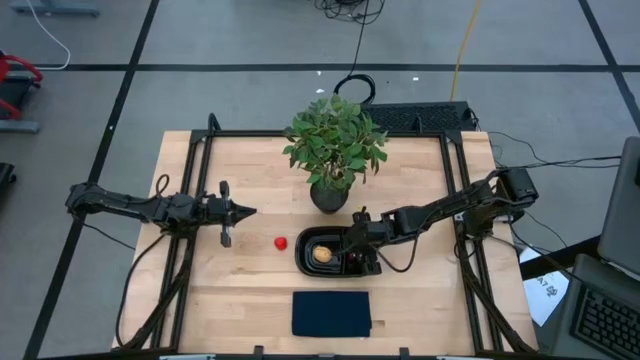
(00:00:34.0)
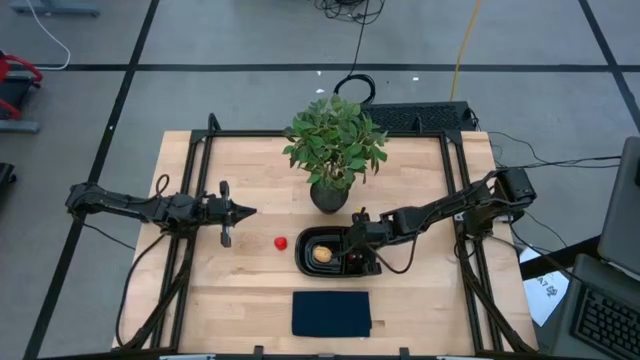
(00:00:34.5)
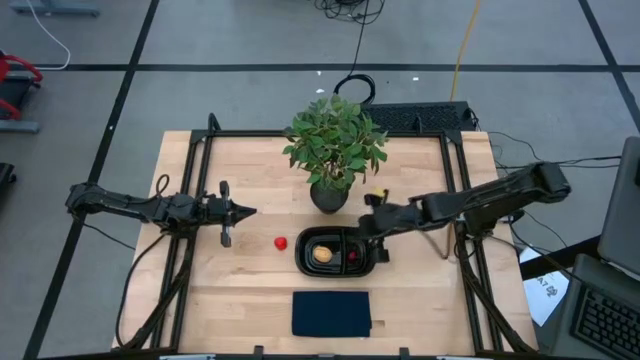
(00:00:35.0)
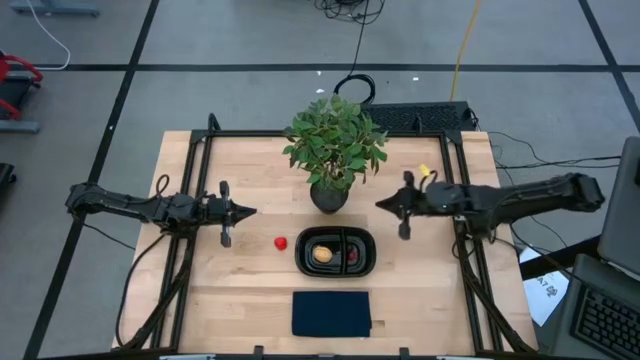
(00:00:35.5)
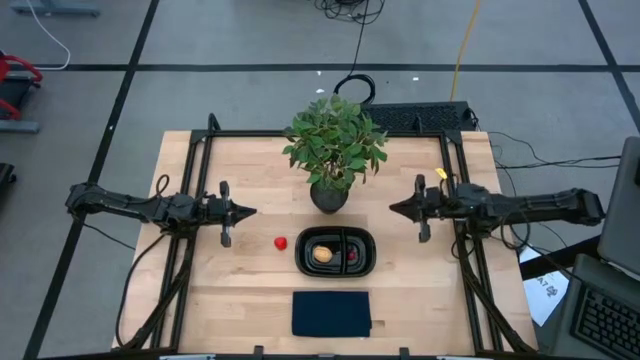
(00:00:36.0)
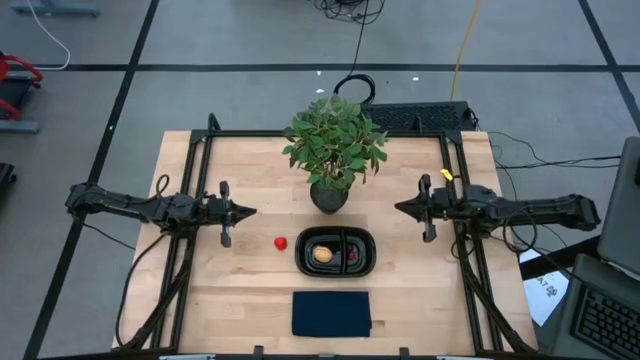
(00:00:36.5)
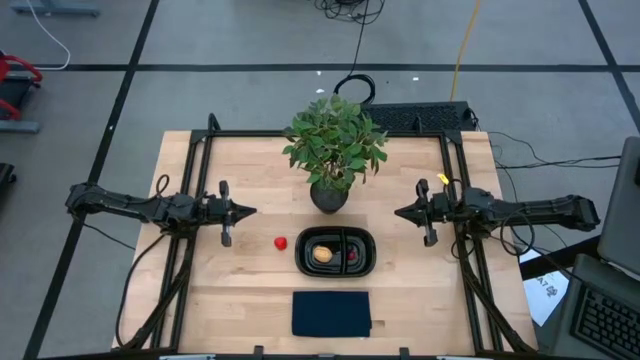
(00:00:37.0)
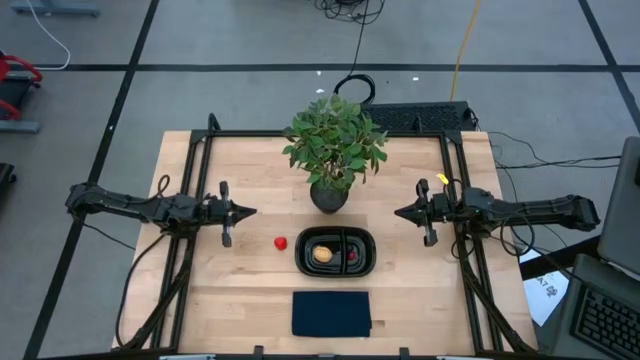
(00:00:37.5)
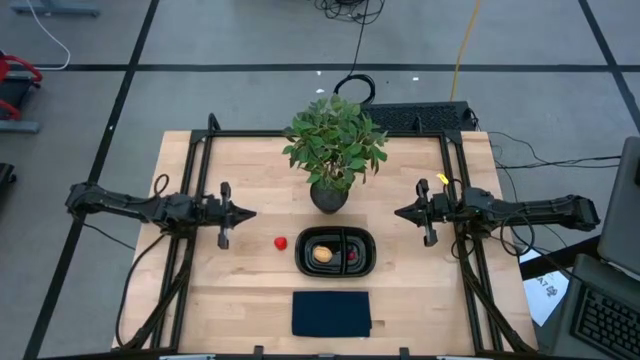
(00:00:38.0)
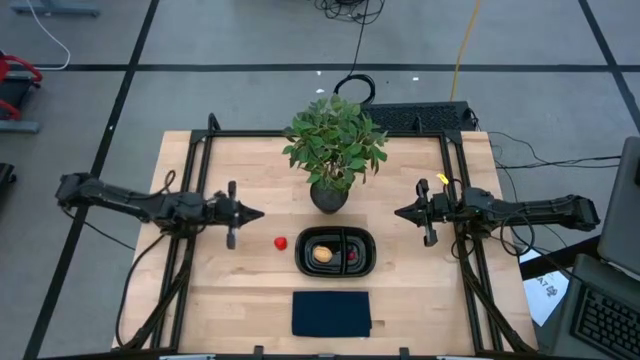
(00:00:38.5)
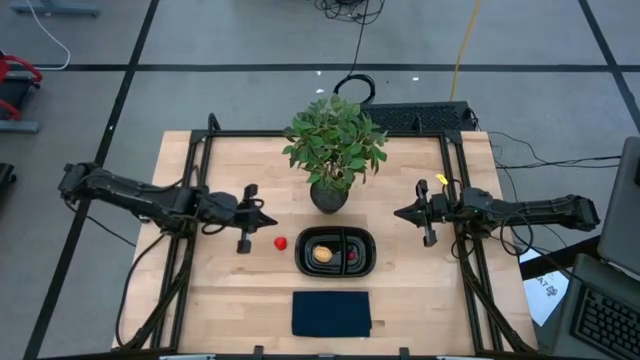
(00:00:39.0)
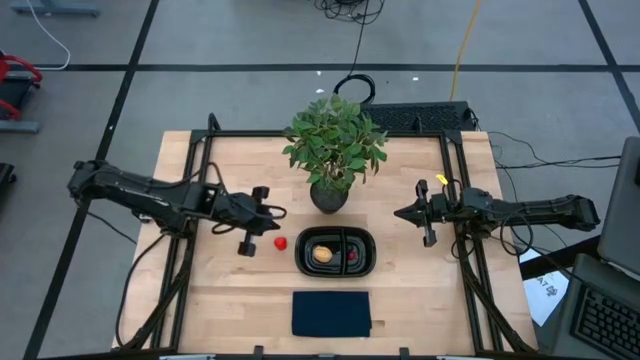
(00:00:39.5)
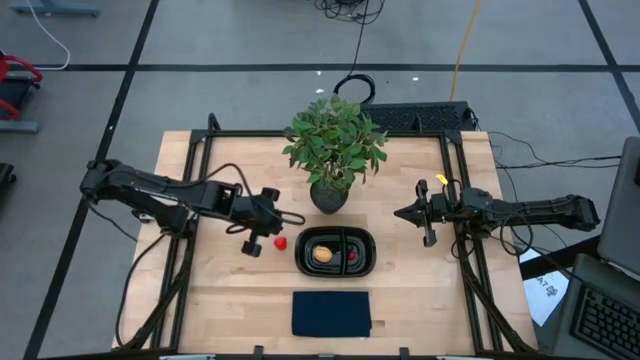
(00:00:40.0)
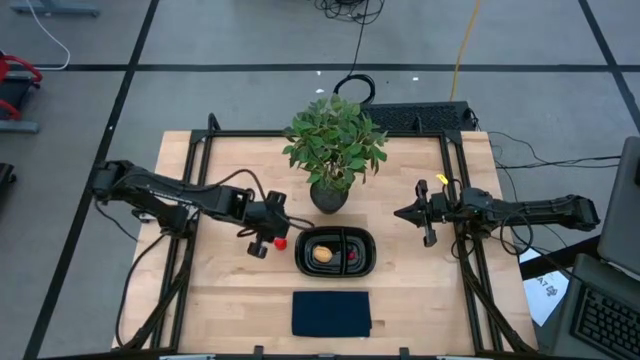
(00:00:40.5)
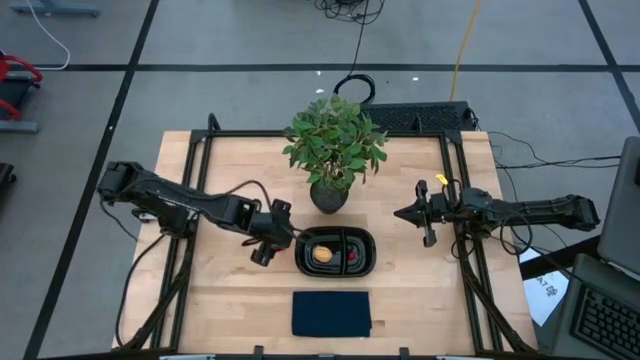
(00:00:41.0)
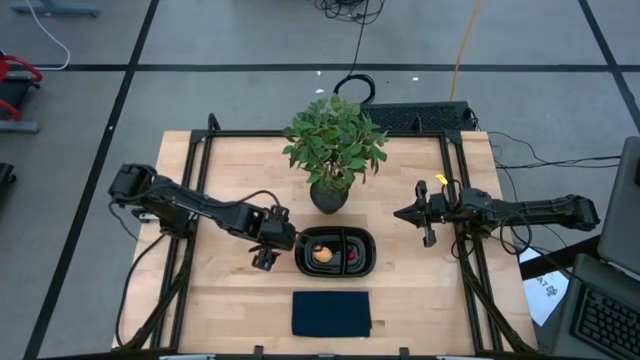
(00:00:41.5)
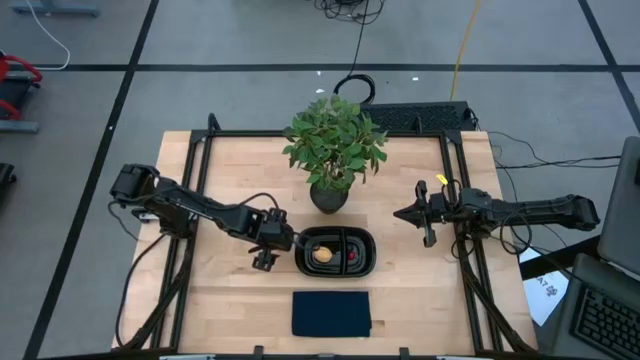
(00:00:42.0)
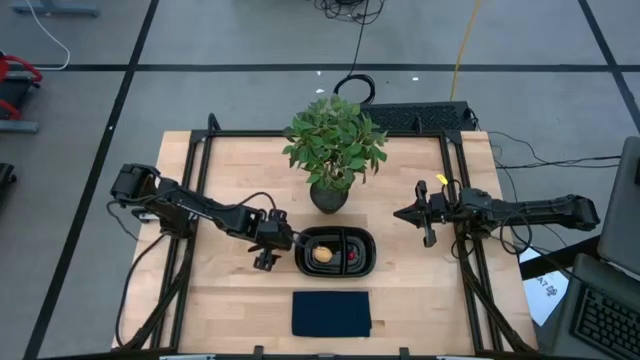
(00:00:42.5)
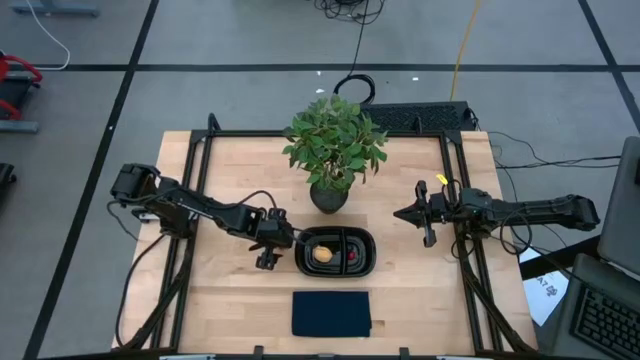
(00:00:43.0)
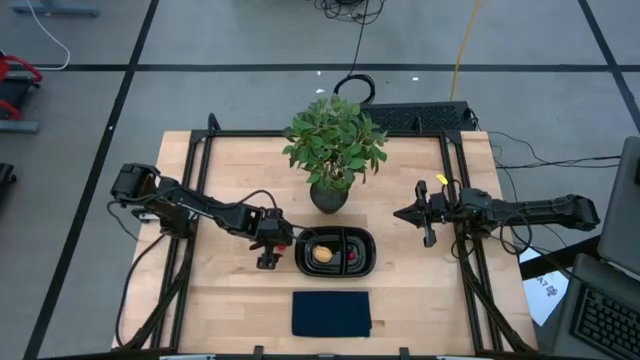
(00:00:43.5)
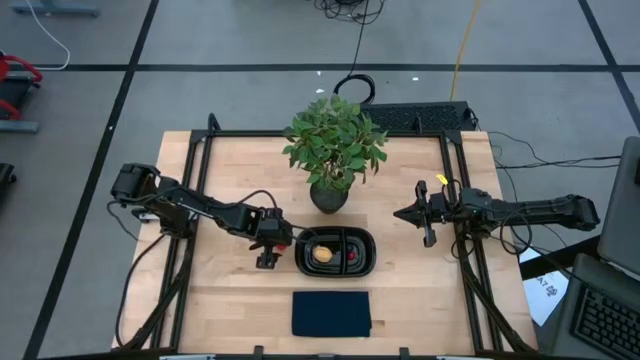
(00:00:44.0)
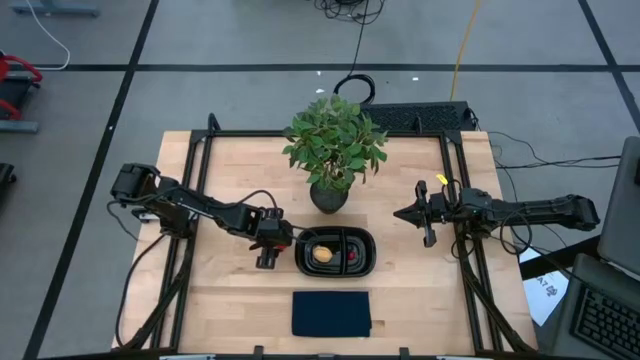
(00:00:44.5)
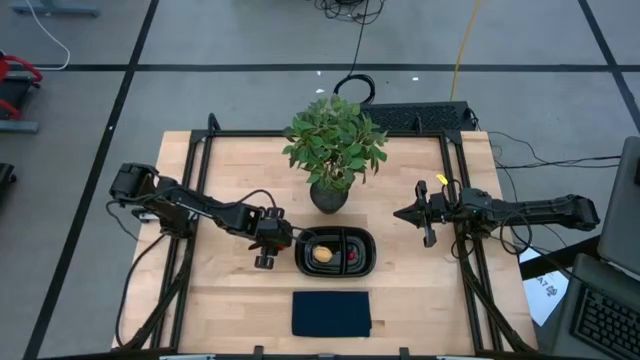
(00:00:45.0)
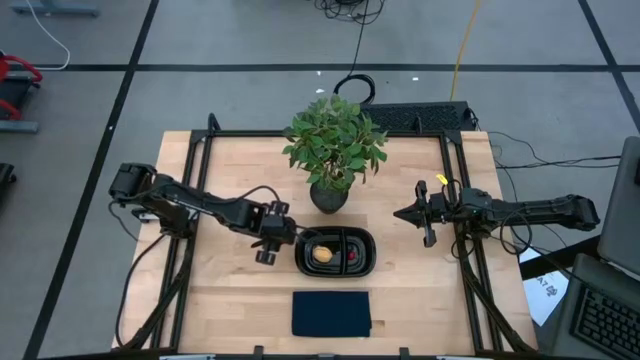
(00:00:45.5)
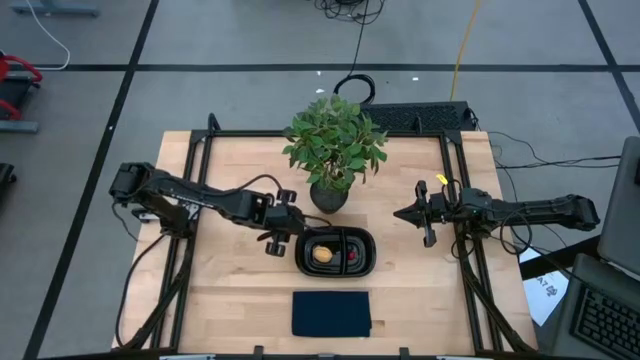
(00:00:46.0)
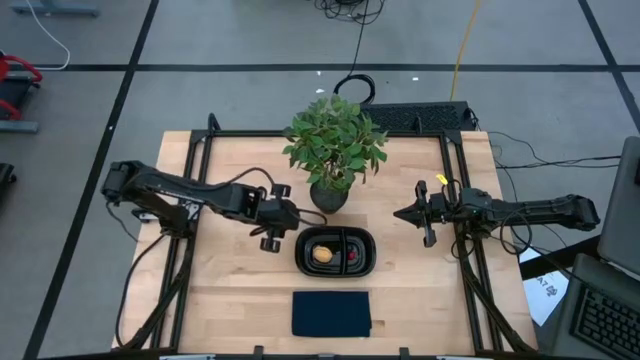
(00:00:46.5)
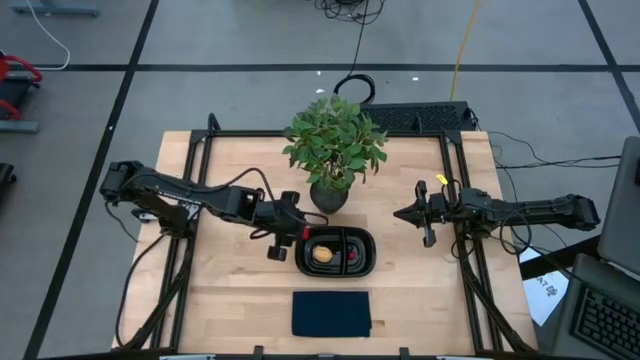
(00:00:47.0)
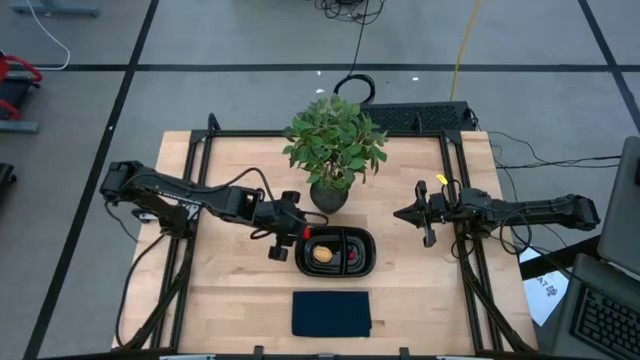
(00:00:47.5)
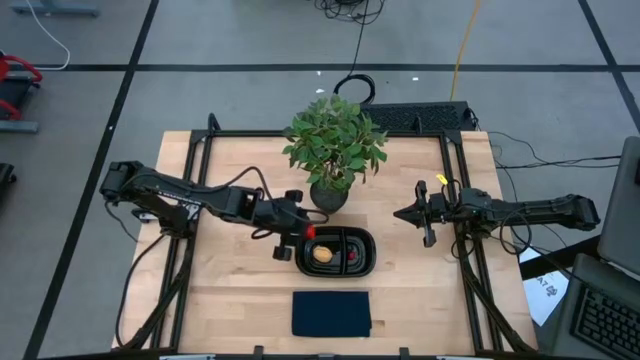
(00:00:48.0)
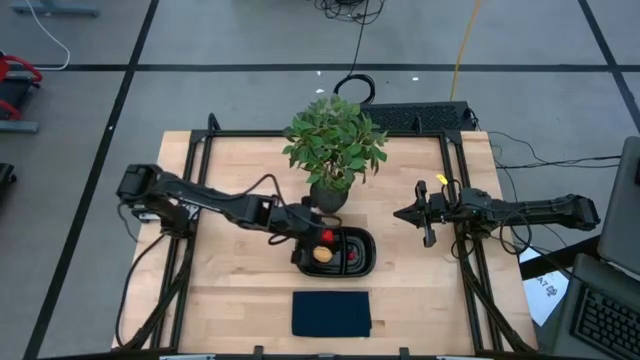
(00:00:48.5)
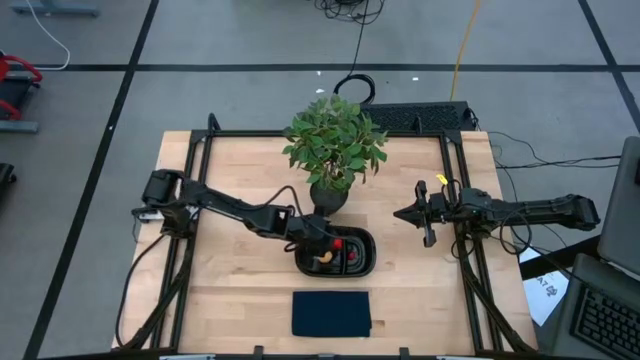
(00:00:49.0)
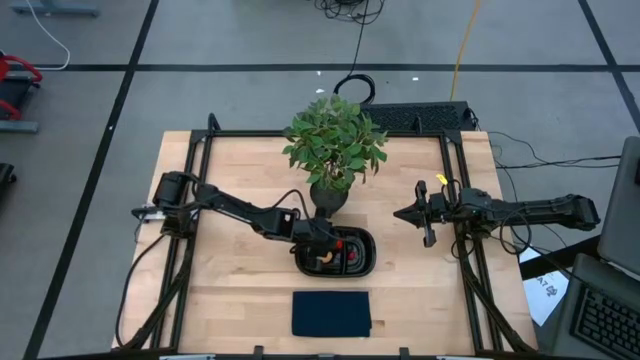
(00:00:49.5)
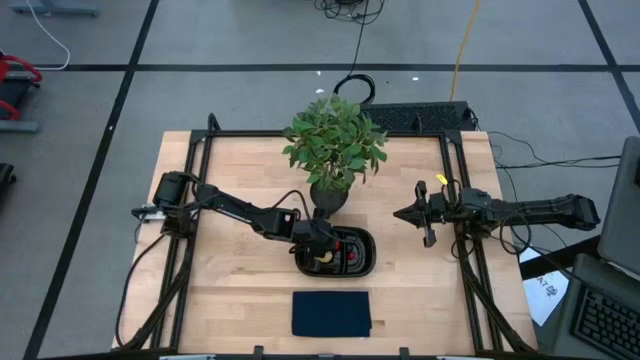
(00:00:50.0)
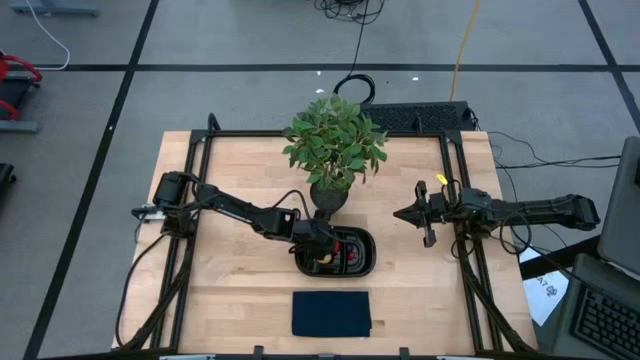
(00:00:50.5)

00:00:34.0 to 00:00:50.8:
Task: Pick and placing Produce into tupperware
Put the red strawberry into the black container
